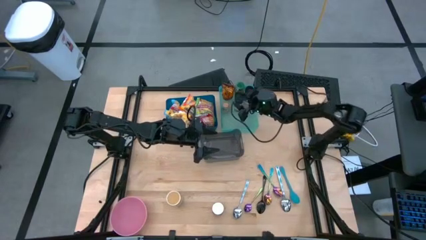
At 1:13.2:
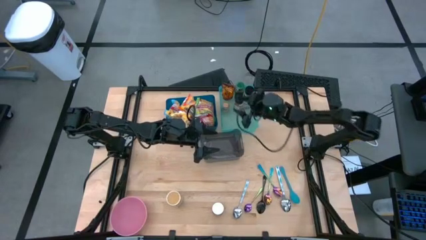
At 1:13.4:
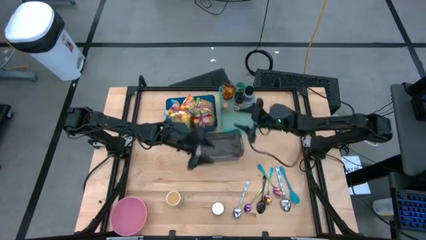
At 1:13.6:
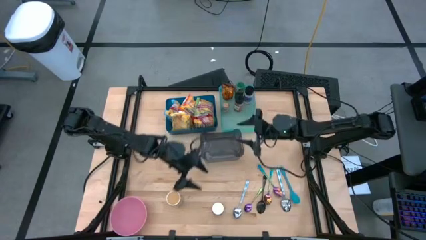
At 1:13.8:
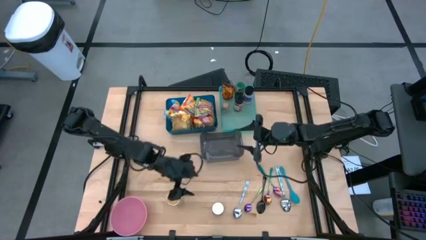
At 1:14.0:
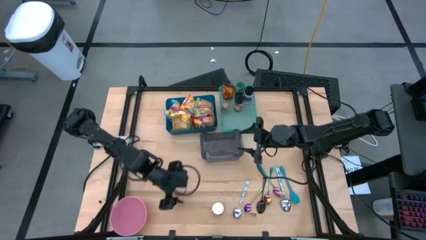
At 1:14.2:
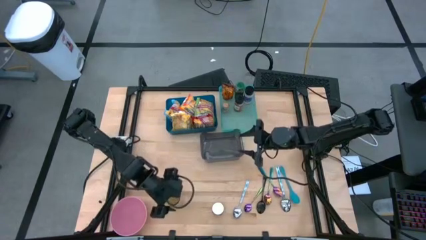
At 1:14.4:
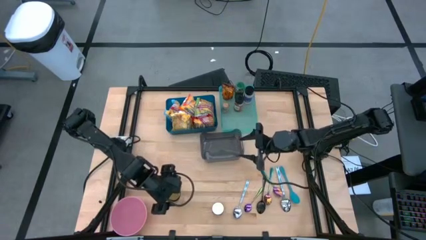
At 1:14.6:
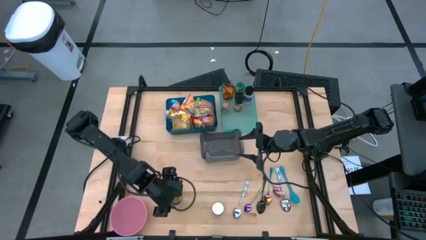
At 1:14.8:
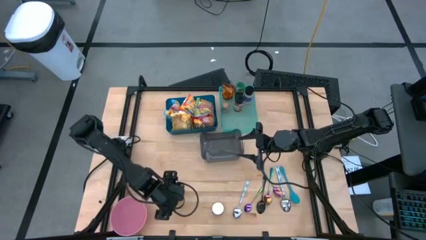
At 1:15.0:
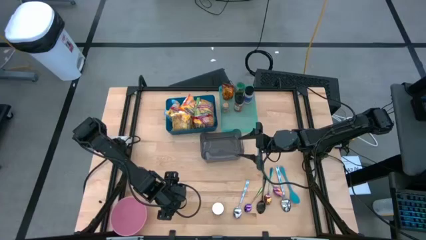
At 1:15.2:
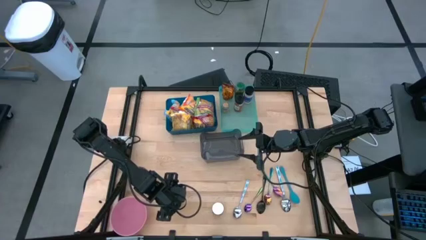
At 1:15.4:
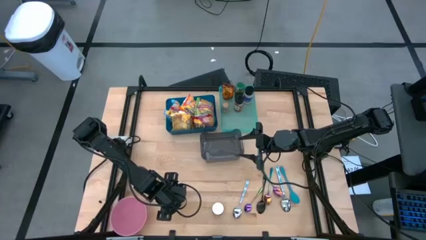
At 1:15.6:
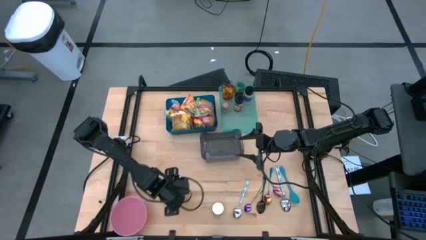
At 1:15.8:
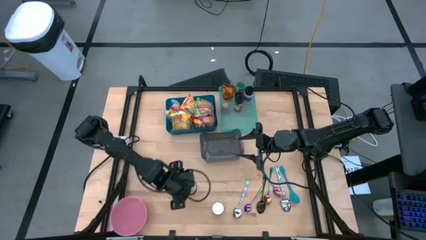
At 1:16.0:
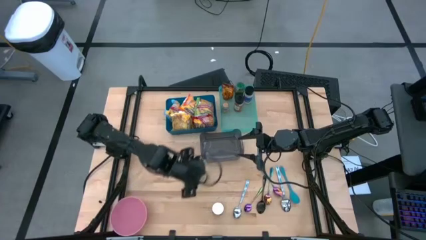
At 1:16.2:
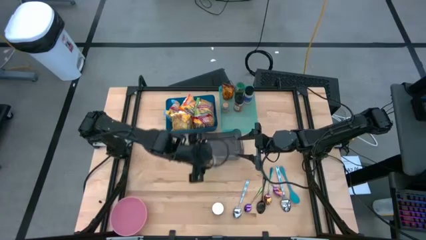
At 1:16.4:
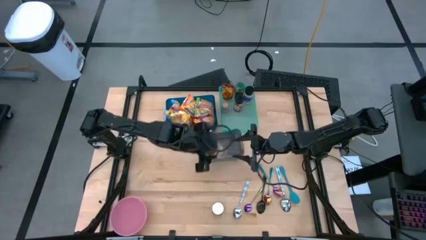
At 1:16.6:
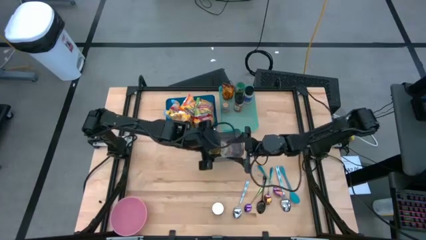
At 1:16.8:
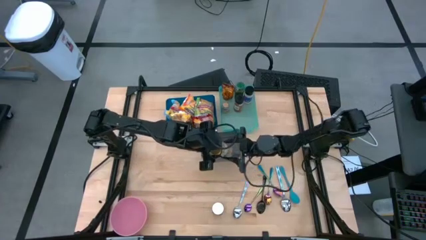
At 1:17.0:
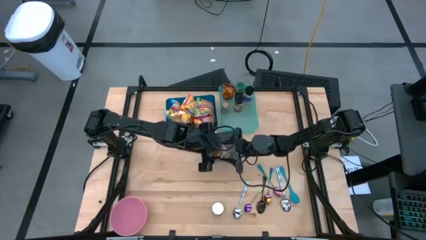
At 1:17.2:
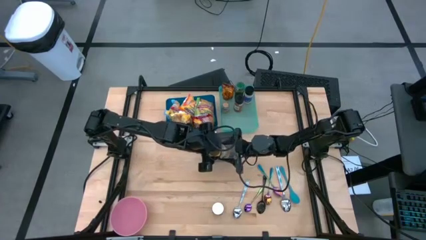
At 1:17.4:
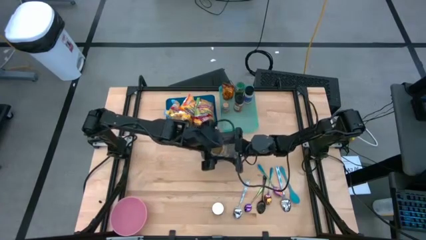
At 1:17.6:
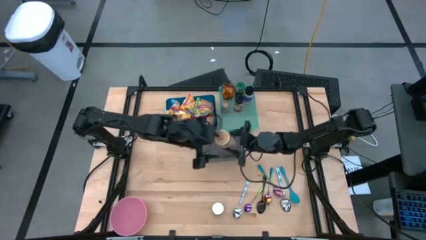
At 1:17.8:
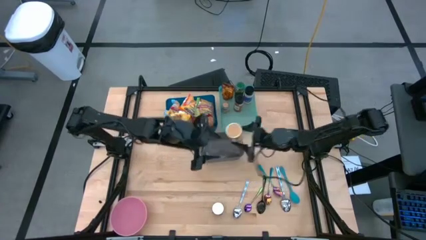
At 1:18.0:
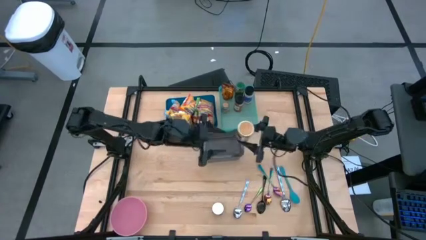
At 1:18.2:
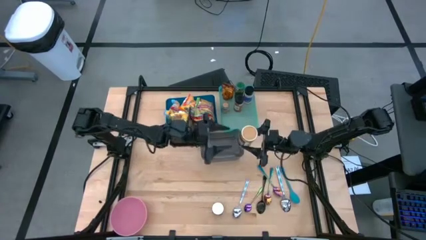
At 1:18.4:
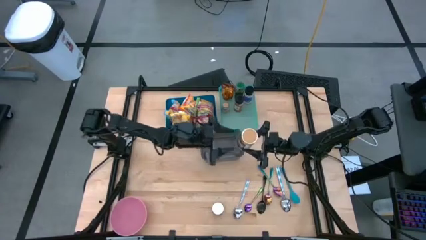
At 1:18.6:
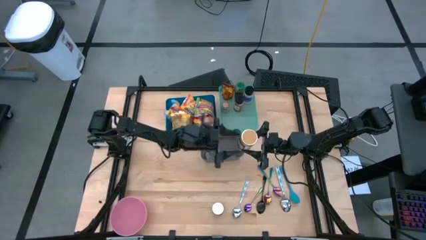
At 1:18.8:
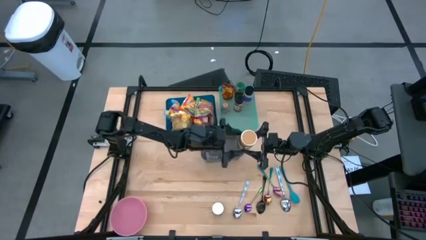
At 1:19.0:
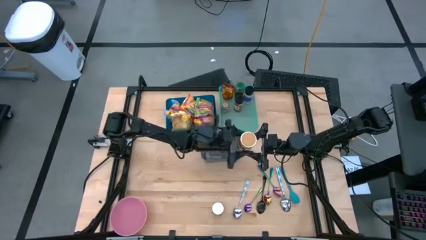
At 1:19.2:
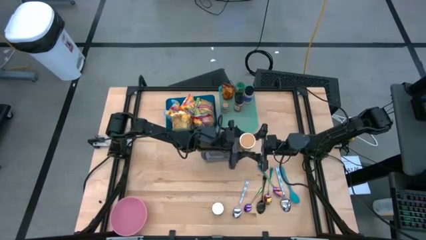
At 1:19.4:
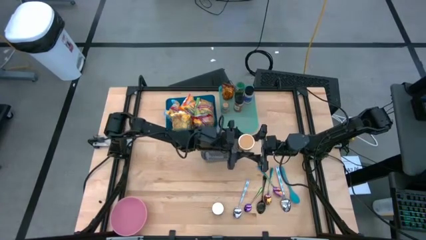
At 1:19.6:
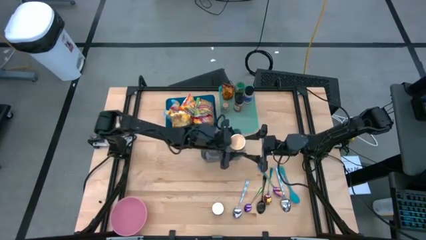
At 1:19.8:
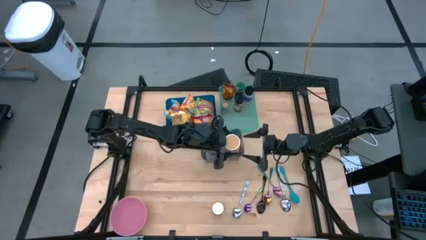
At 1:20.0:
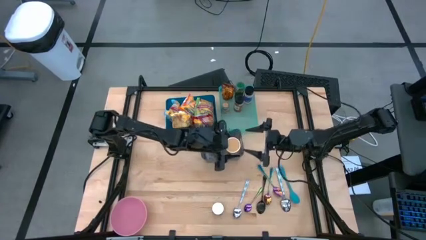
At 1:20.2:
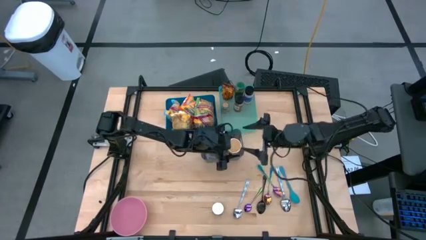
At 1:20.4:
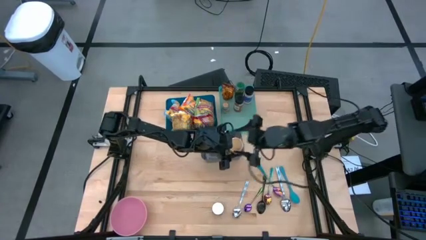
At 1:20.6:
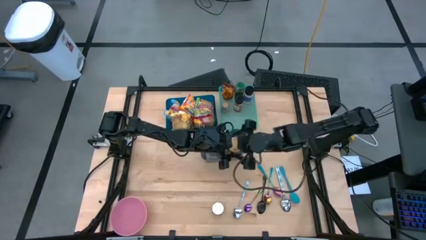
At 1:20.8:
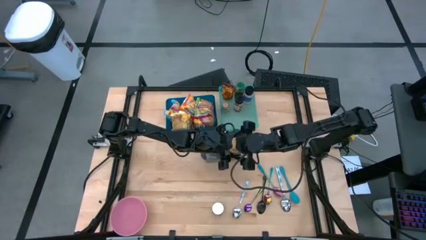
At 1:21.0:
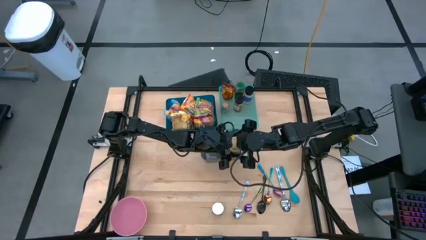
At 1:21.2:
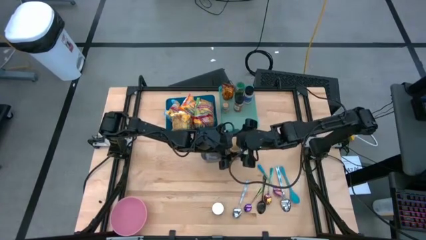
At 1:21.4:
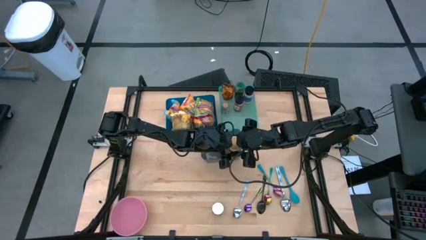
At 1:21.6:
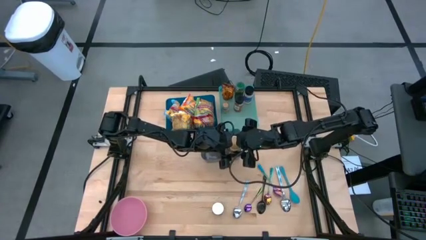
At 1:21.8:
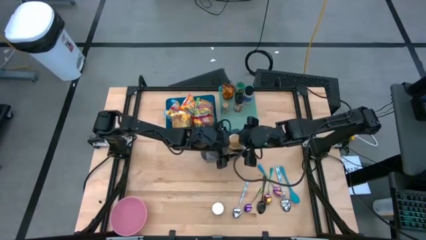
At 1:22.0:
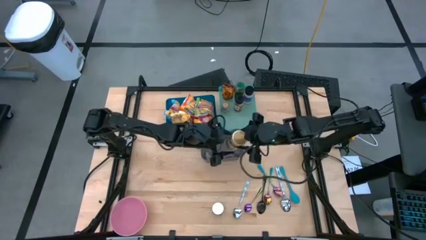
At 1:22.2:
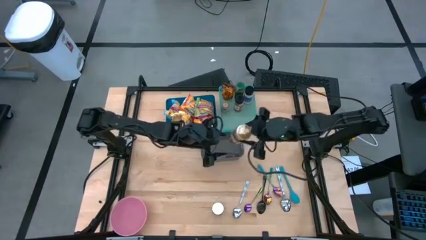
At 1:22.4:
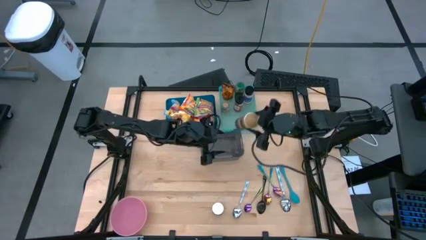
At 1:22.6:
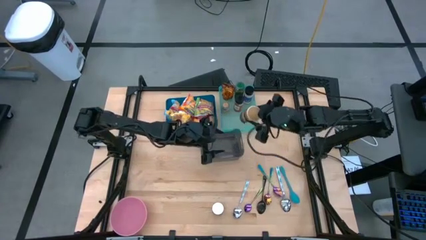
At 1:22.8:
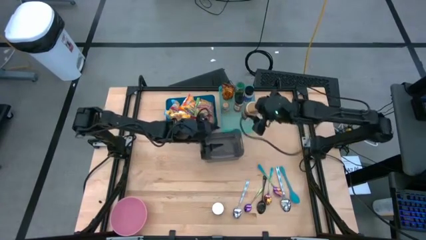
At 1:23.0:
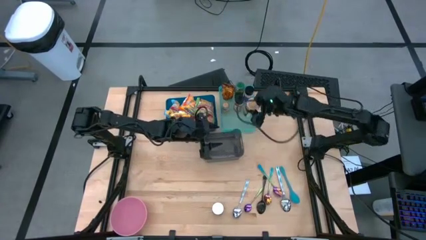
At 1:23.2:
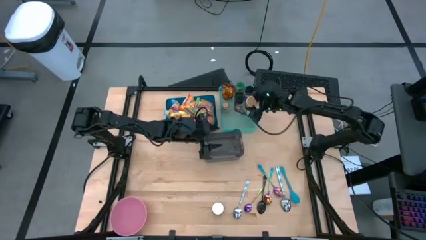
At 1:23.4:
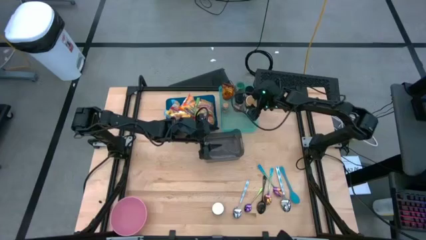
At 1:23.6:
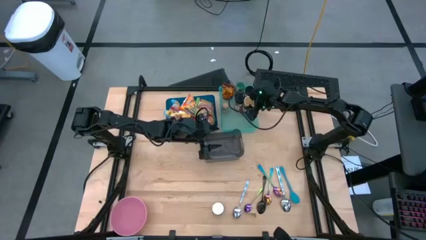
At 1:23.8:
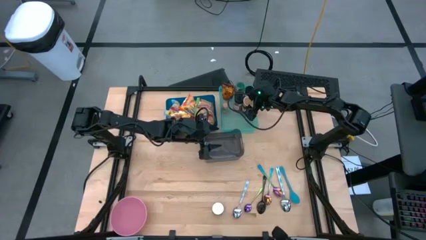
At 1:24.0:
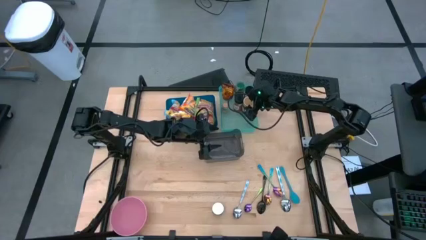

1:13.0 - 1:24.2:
Task: Pick & Place Food Item
Put the golden seasoning bottle into the green bin

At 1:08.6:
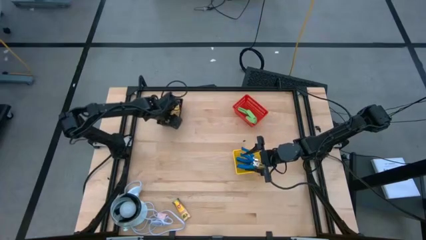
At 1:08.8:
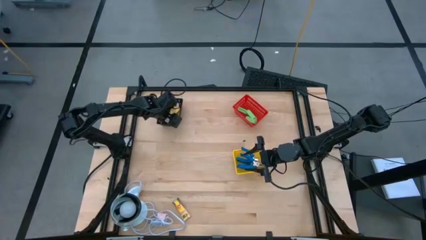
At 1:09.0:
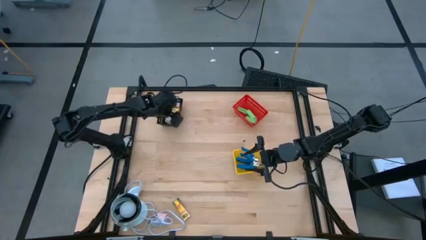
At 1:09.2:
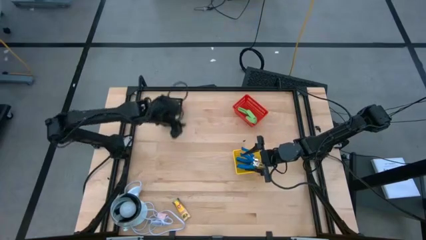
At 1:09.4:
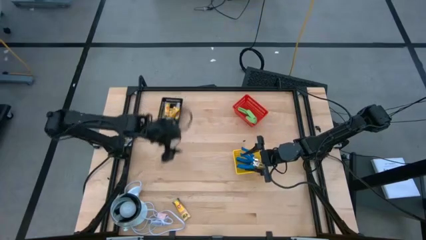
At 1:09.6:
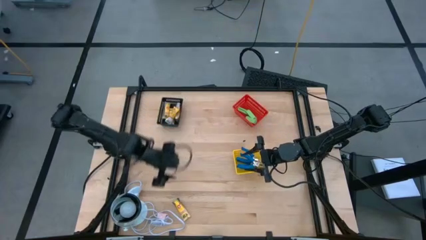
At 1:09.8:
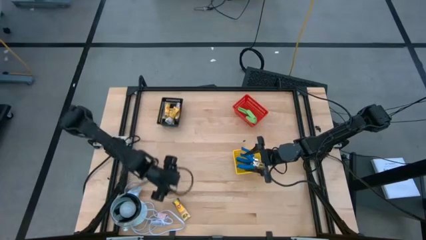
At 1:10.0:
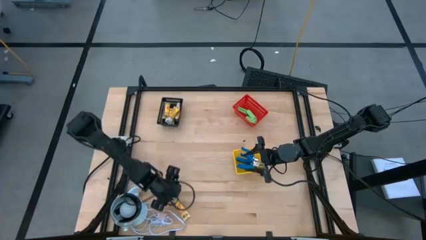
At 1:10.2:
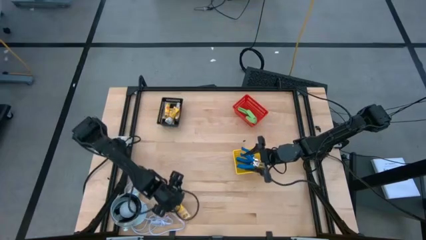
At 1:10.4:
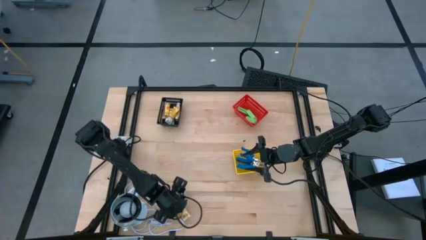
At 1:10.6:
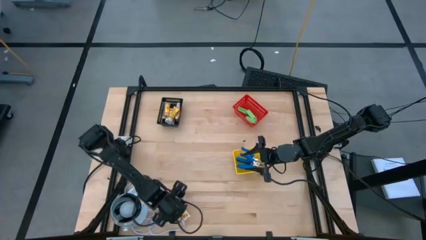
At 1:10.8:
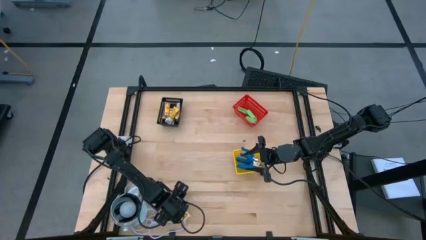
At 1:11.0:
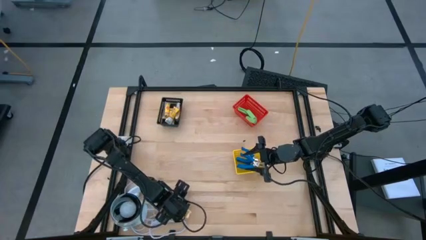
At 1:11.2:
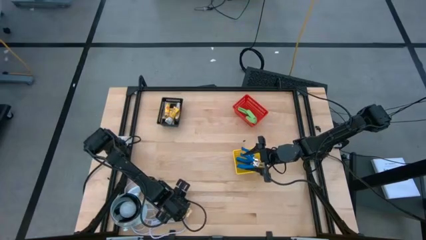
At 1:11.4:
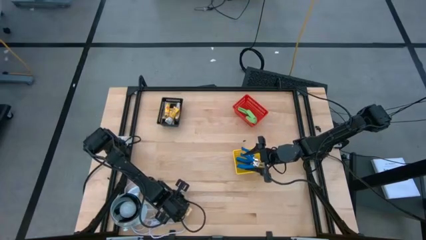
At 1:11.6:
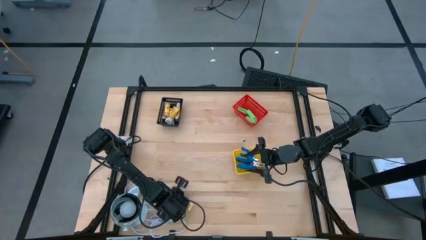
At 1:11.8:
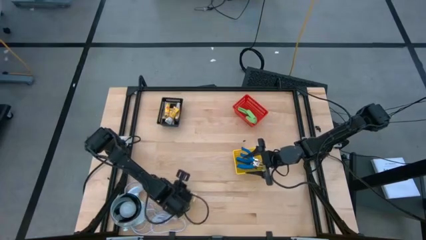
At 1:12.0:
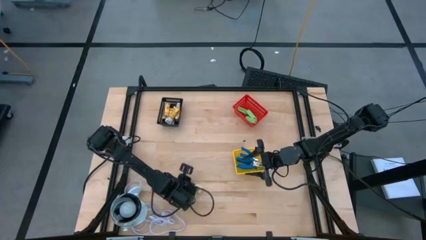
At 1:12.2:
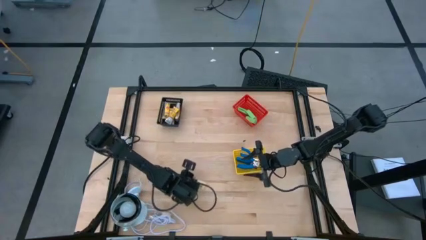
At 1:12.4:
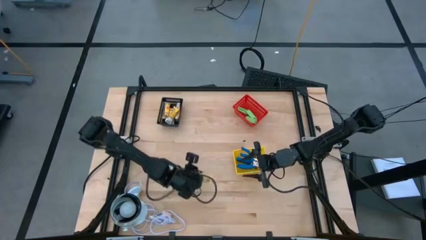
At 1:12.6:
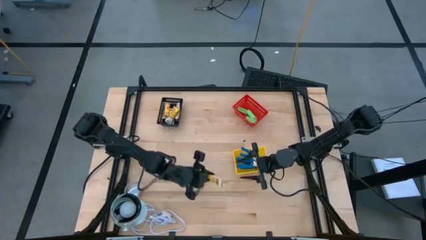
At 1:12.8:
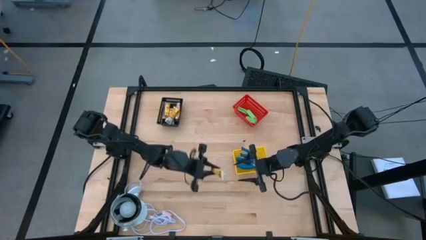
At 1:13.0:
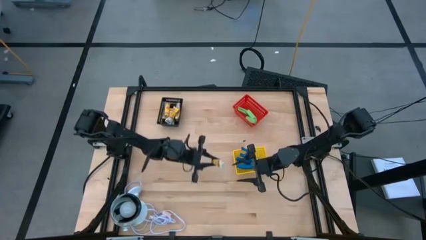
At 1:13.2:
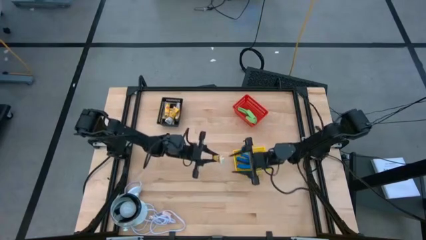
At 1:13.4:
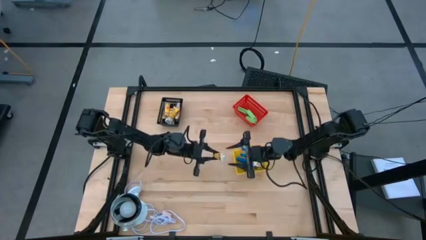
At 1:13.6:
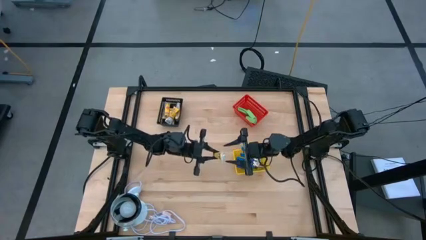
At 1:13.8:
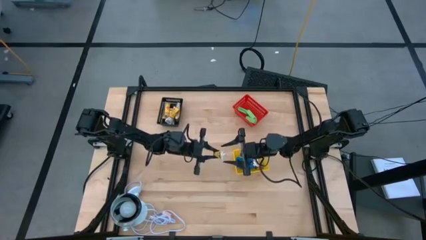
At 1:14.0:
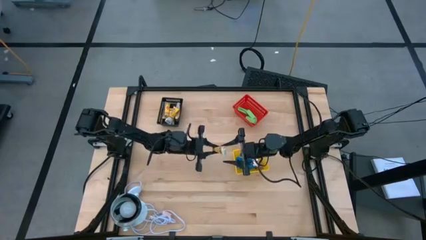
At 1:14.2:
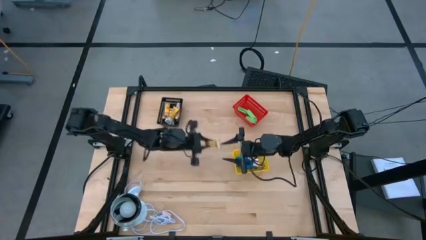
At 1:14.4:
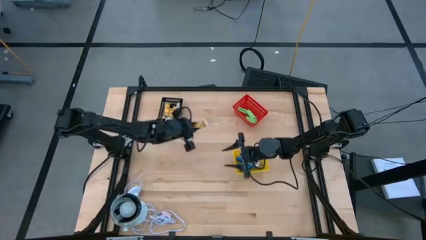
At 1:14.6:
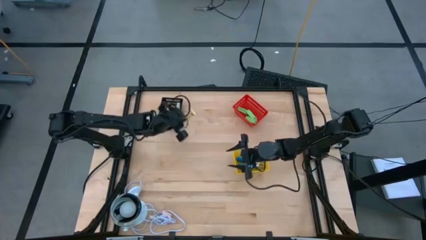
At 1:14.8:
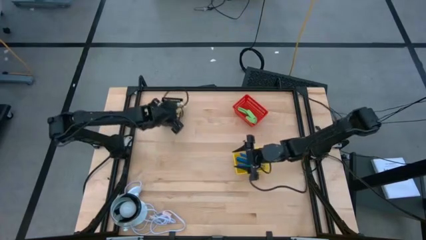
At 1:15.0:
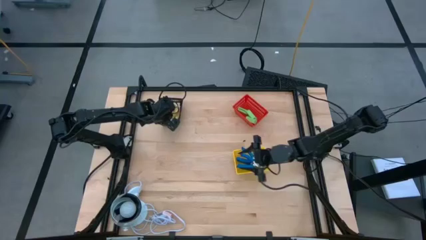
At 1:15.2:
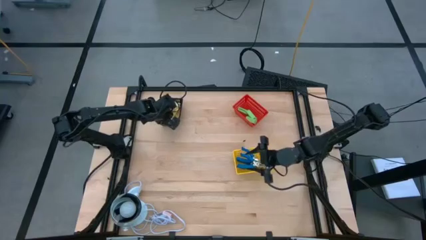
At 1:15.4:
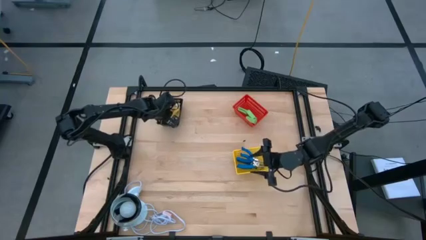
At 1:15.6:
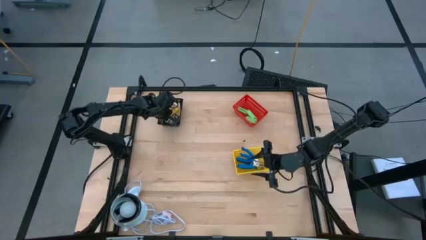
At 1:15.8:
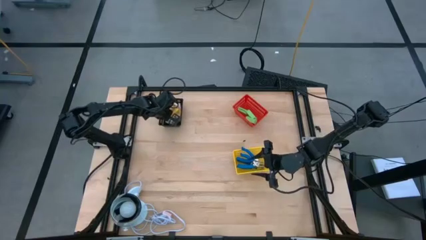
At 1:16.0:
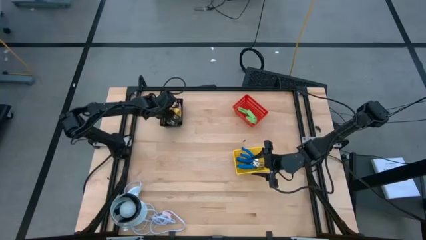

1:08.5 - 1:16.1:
Task: Pick & Place School Supplies
Put the yellow crayon pack into the black bin
